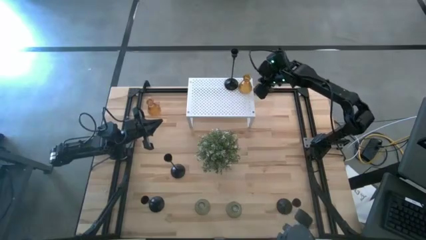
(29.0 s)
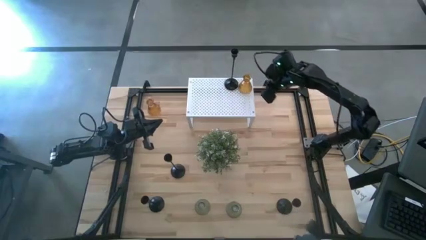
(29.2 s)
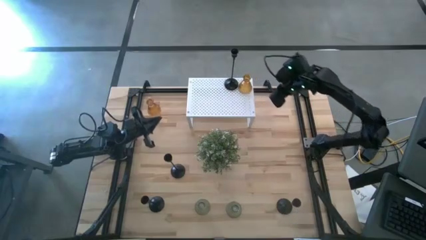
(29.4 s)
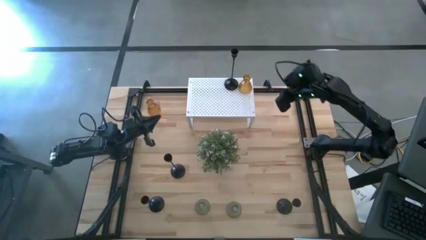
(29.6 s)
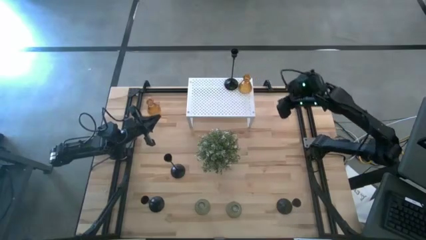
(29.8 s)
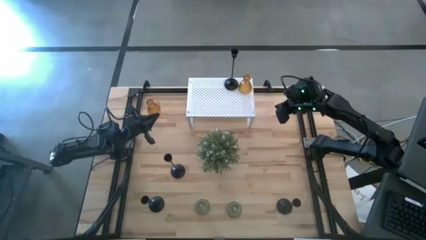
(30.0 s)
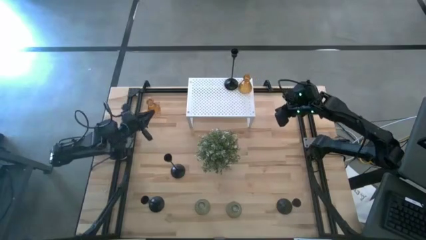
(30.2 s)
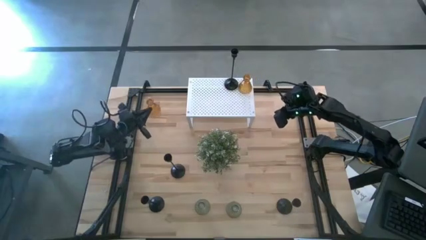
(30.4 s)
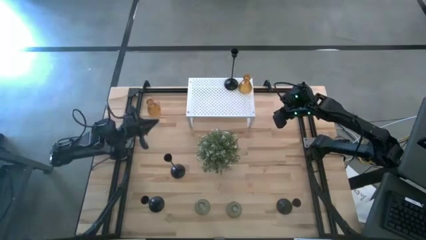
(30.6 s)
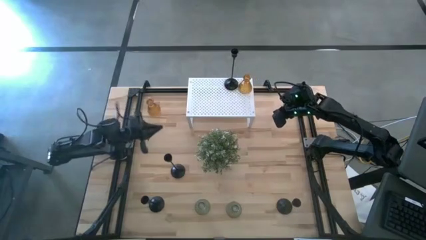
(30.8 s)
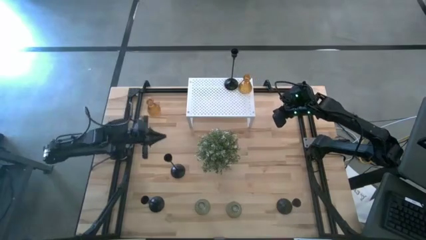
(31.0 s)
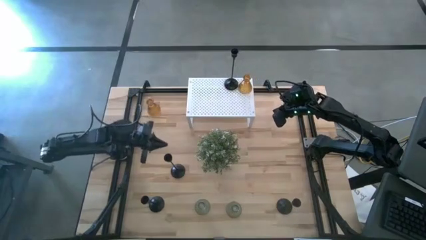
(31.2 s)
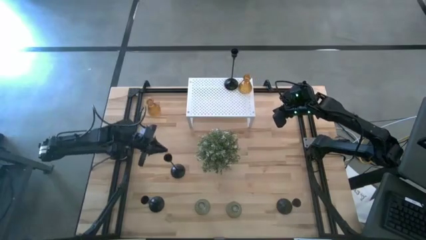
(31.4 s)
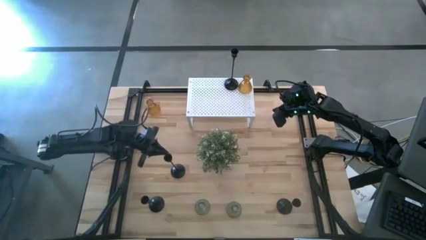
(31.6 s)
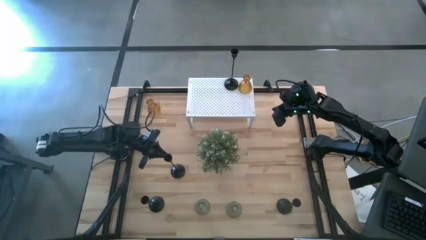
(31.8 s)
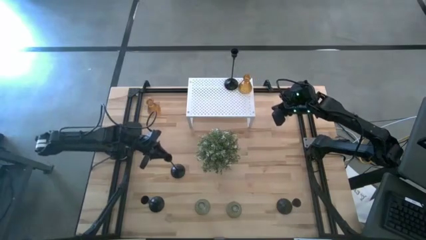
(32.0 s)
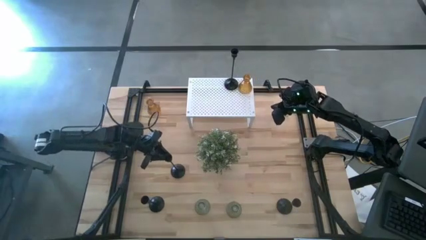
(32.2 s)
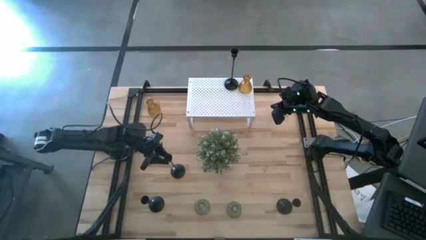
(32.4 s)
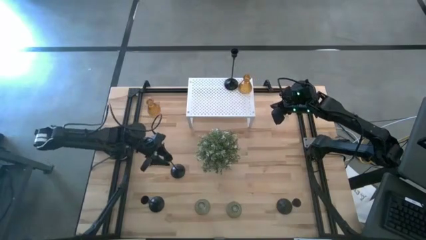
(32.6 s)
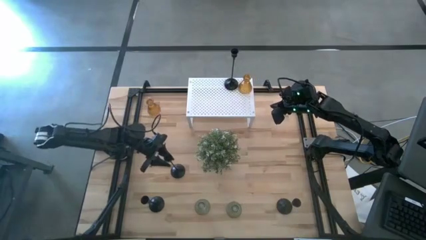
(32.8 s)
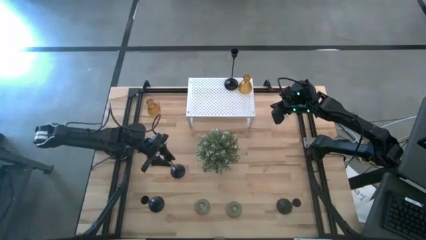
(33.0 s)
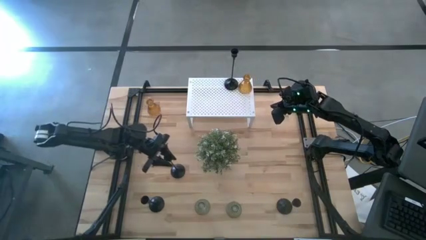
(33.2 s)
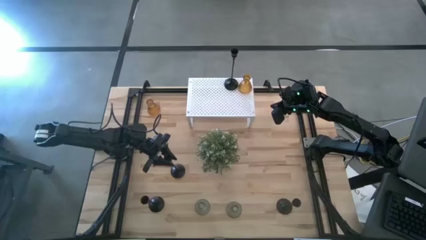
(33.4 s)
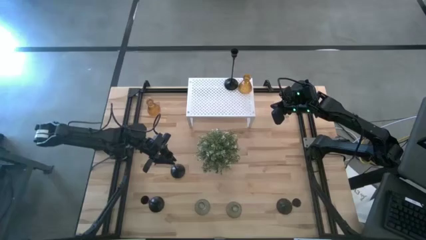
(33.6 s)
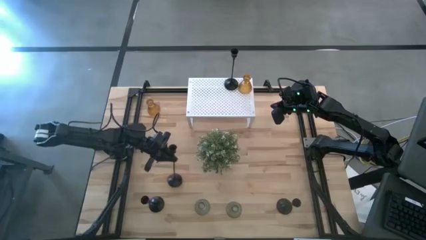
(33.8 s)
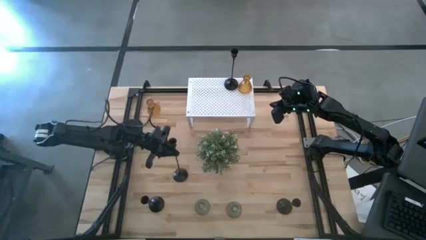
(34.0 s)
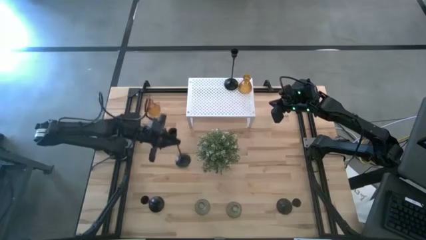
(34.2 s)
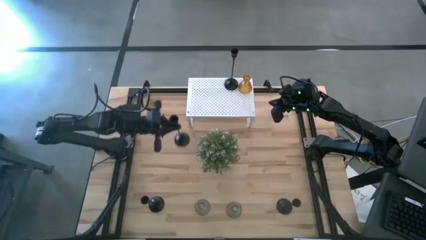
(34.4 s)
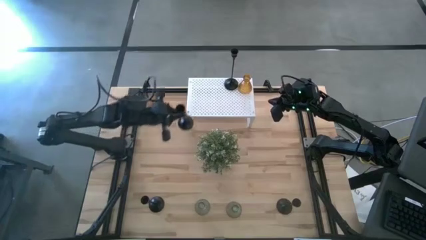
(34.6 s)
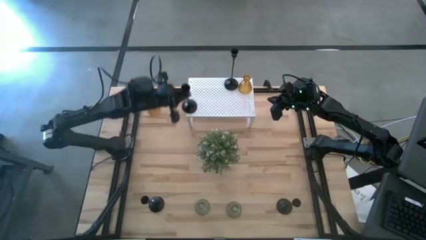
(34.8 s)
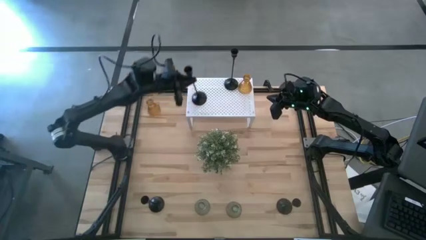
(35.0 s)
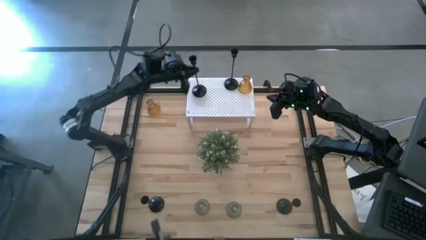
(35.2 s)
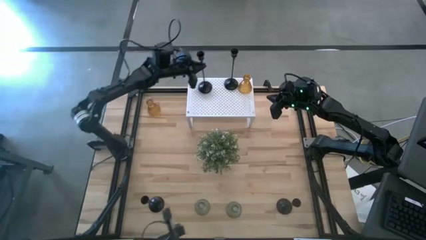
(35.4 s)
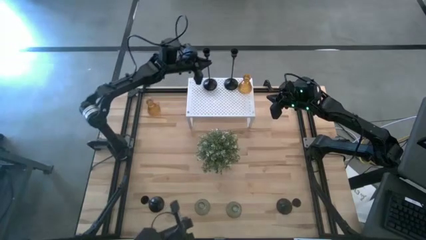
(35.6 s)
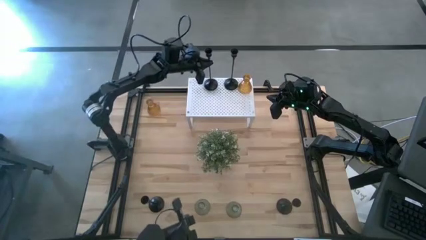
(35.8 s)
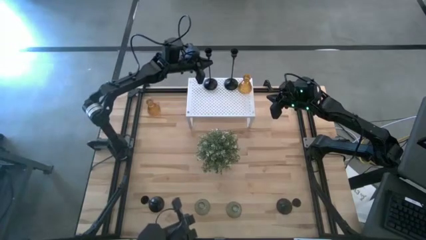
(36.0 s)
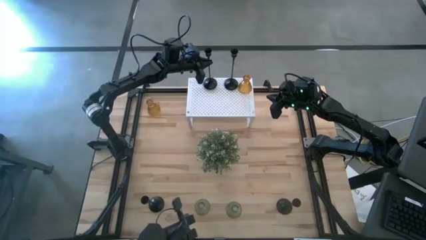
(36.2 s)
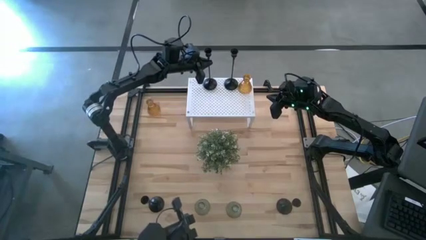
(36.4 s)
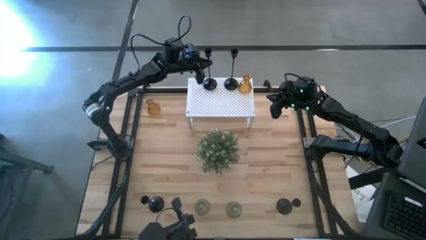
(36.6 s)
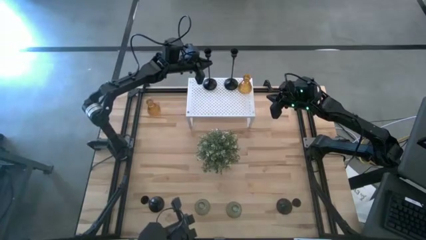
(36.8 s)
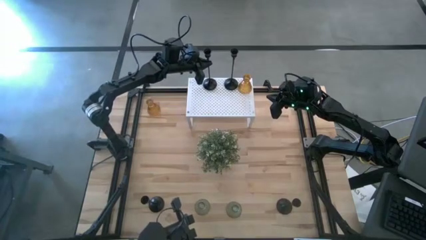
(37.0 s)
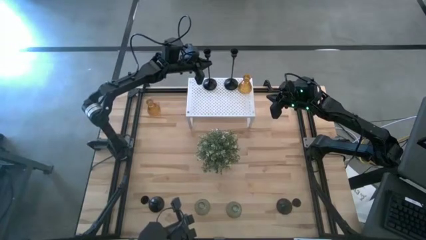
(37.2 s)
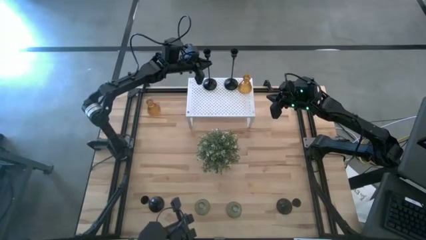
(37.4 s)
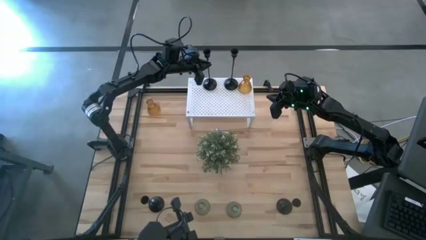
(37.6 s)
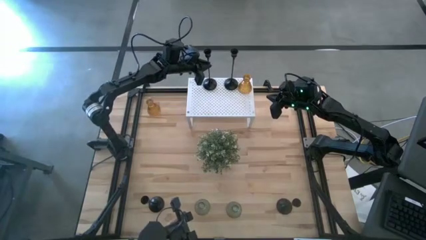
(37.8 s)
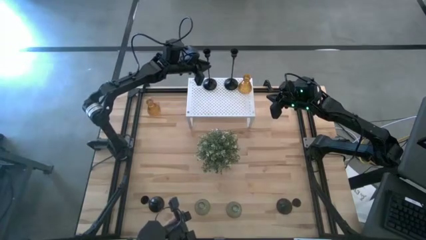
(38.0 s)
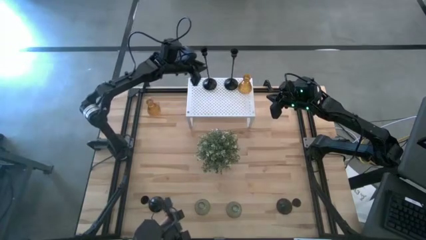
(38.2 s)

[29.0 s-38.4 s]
Task: Pick & Place candle stick holders
Put the large black candle holder on the shelf

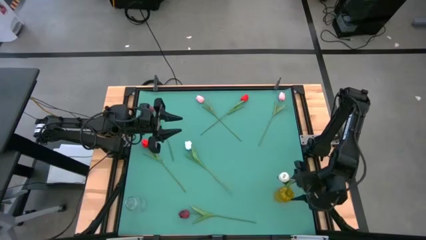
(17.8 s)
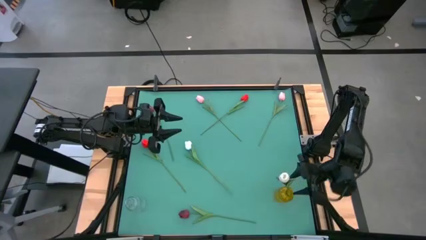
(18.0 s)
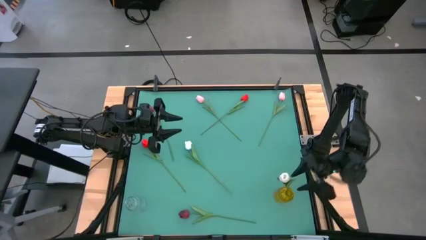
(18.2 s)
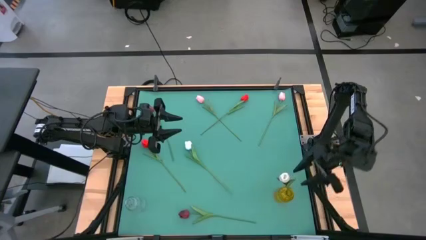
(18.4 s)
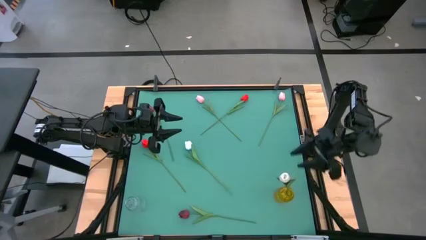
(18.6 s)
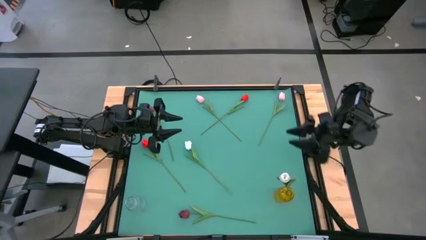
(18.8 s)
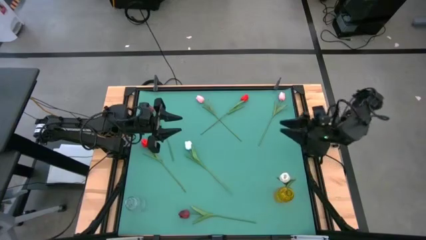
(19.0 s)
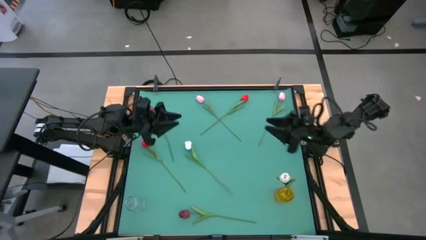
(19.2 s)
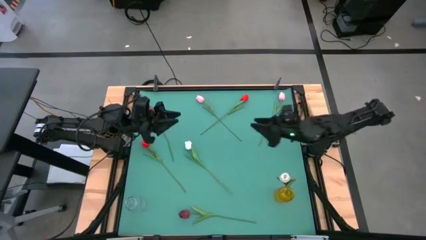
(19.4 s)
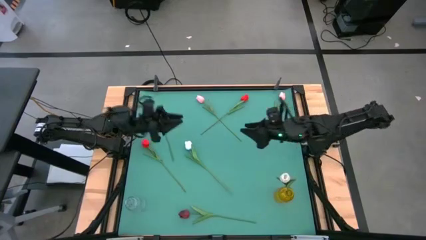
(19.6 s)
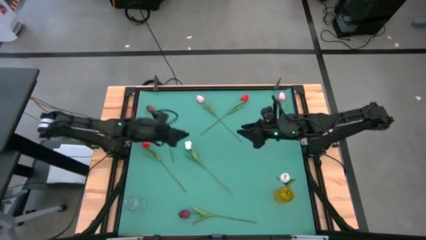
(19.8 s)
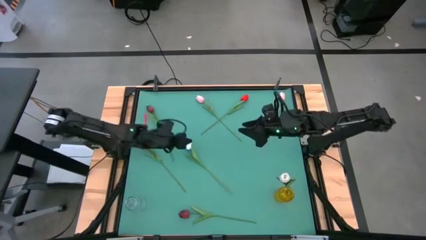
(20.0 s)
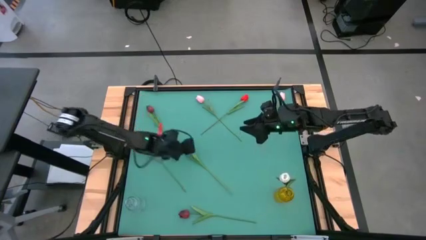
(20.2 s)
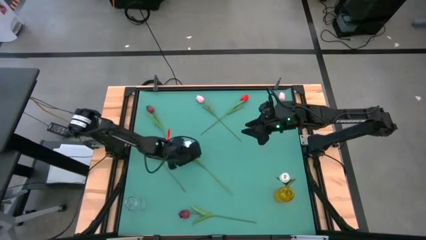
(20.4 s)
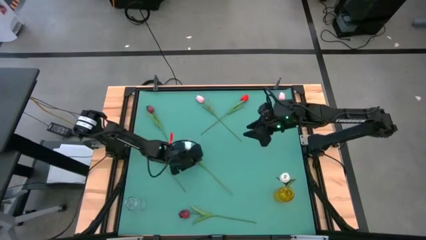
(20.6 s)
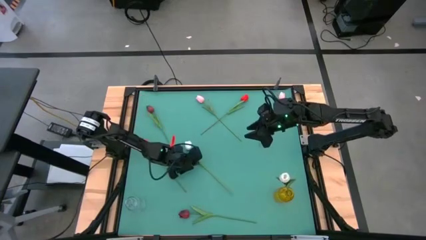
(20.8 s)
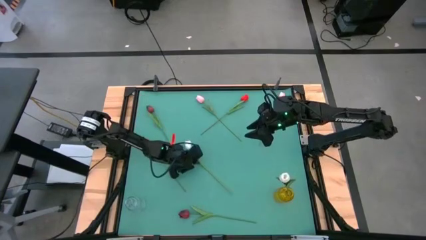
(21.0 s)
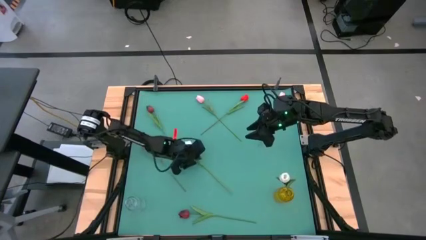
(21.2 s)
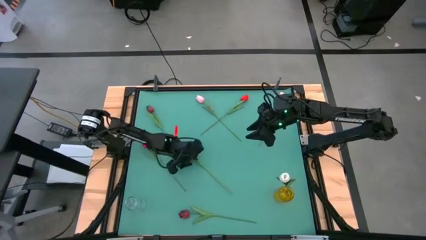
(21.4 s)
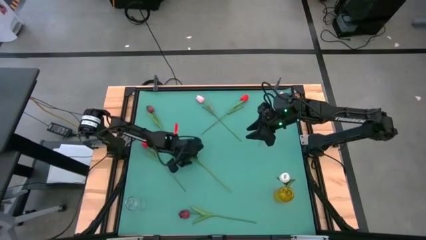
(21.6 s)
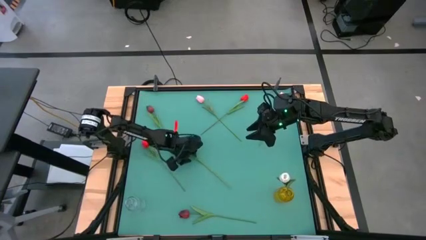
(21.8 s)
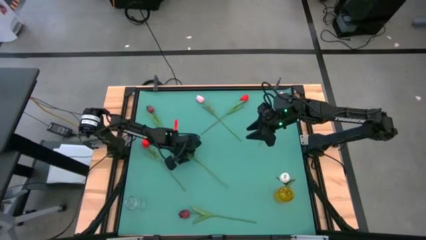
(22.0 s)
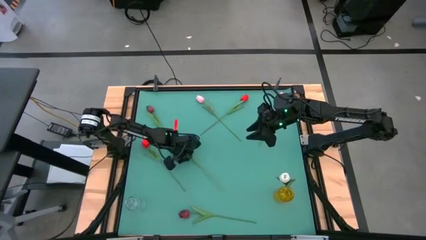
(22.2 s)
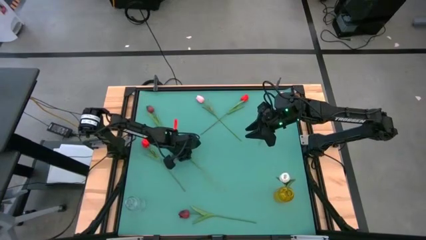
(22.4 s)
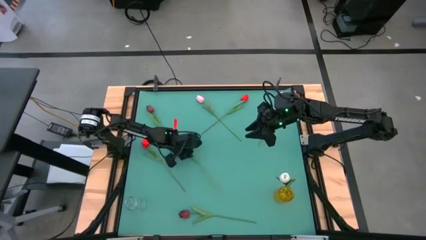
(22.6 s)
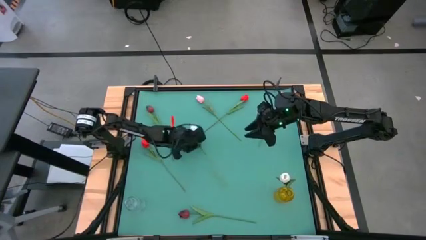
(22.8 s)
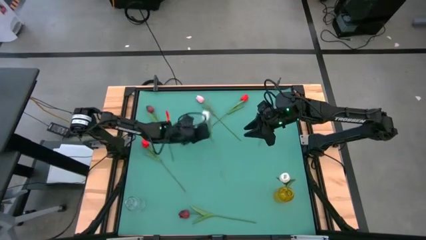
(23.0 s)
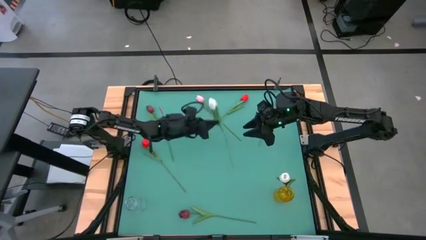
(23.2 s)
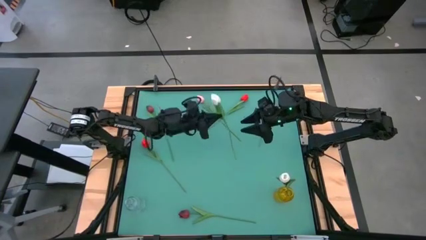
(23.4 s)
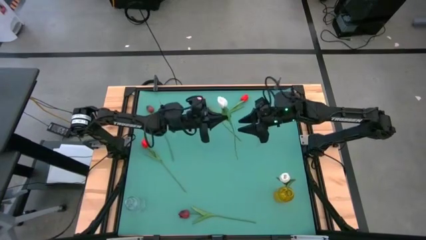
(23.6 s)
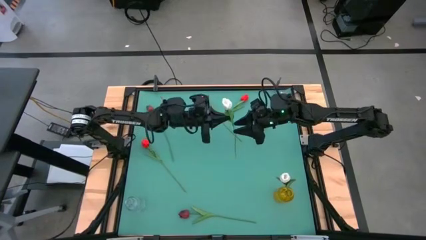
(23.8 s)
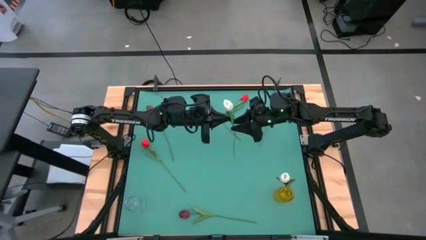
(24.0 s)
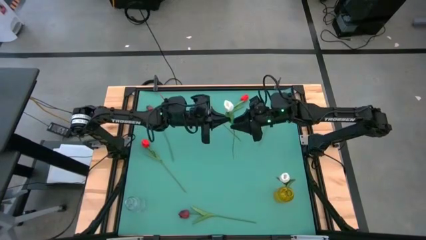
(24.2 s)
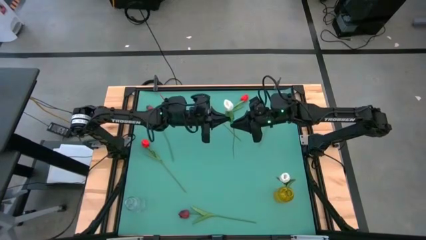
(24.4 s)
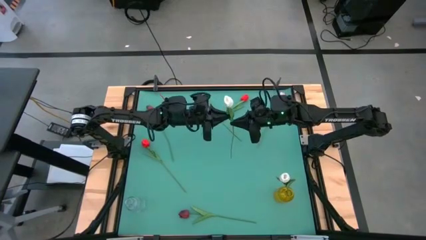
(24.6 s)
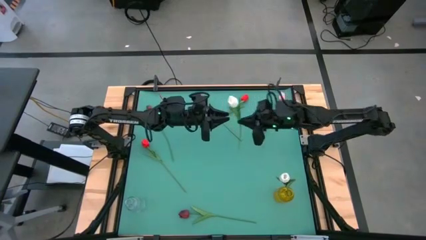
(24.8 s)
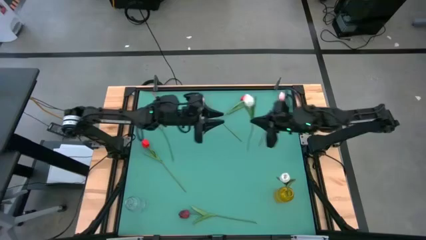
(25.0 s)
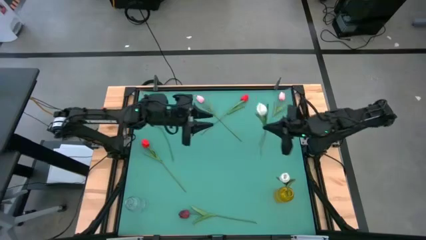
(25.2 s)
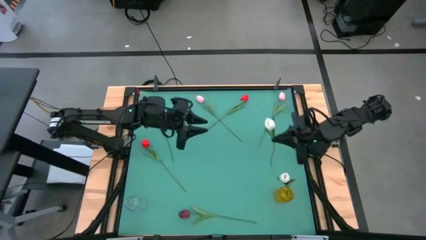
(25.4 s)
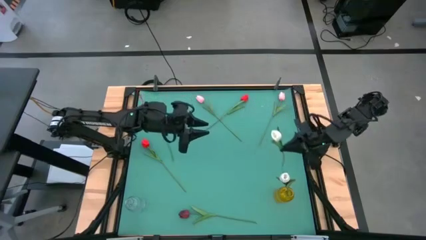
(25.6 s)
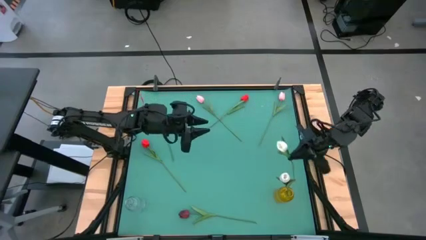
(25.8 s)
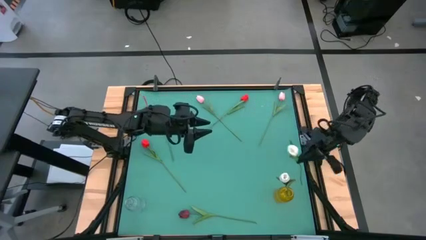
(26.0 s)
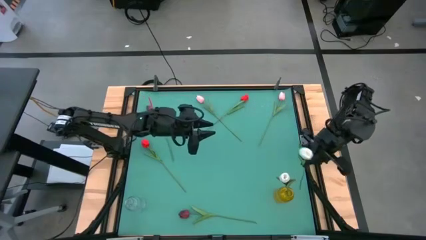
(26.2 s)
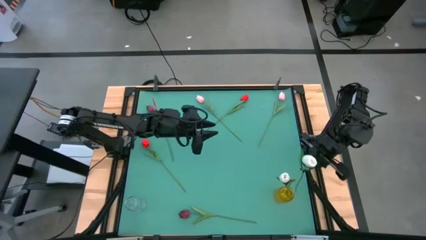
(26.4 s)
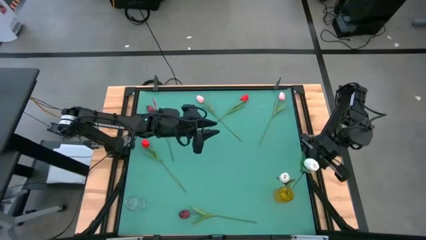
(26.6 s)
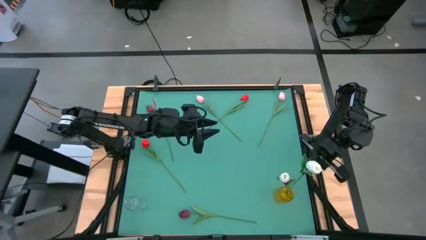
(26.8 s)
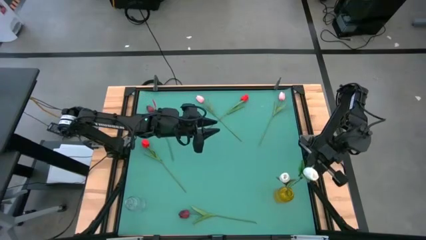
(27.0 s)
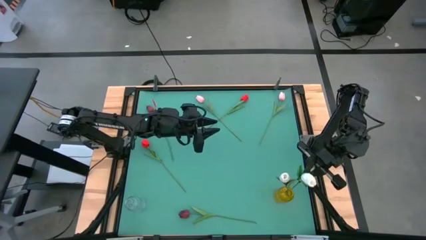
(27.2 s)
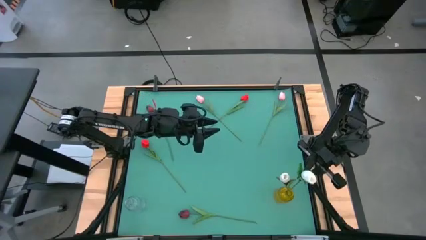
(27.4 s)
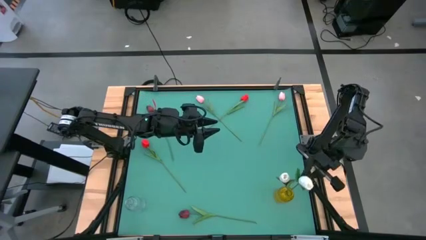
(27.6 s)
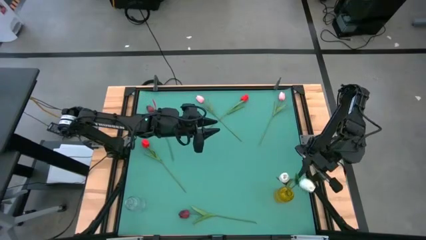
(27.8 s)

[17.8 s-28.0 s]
Task: Sort flowers into vase by color
Put the white tulip into the yellow flower vase
